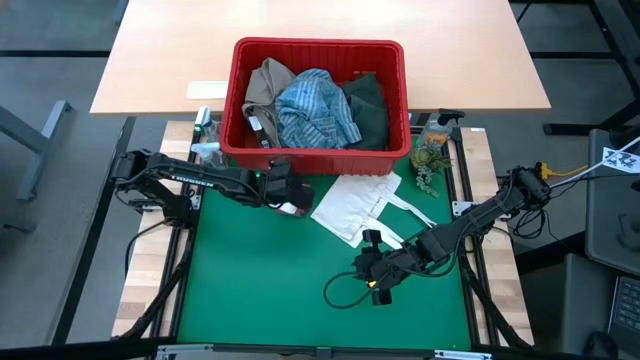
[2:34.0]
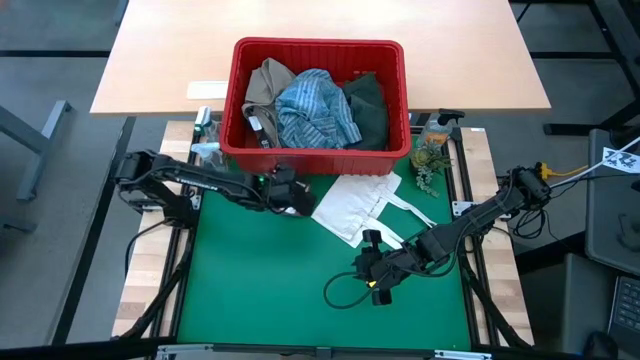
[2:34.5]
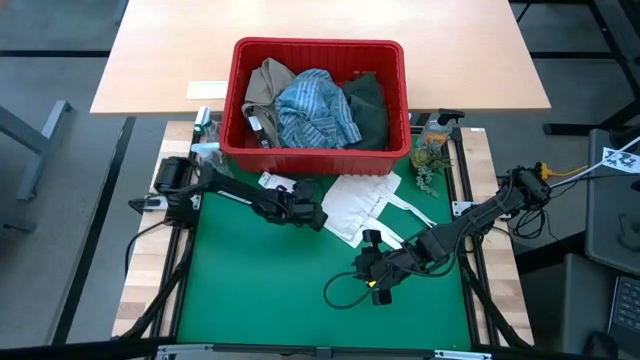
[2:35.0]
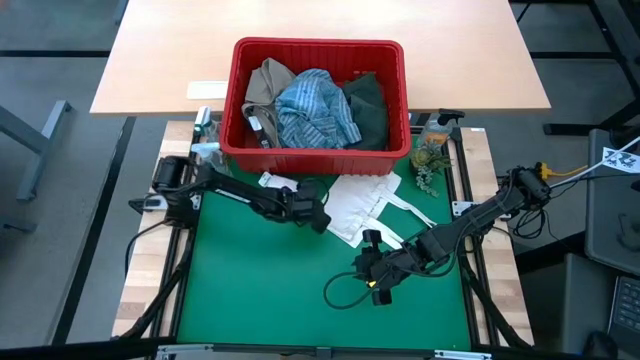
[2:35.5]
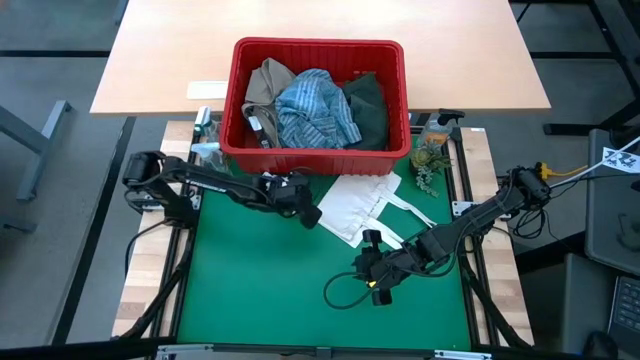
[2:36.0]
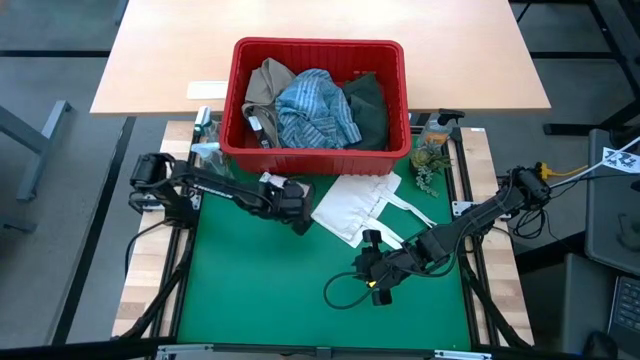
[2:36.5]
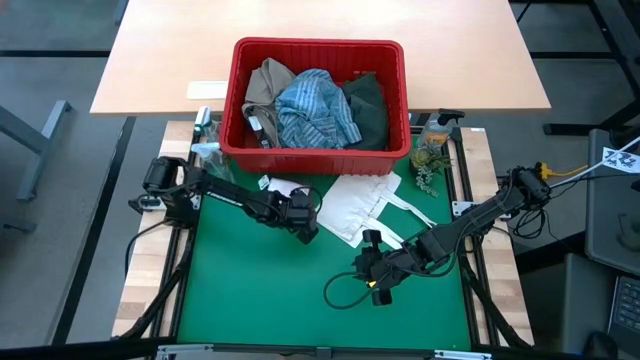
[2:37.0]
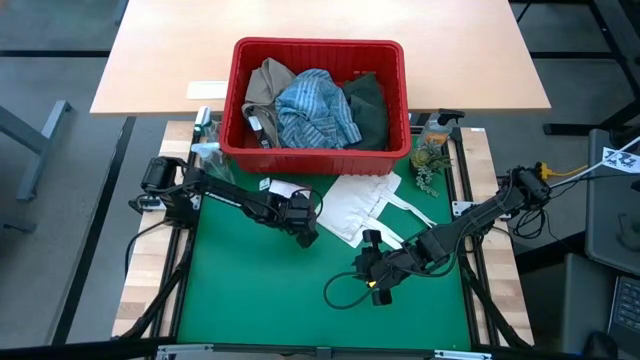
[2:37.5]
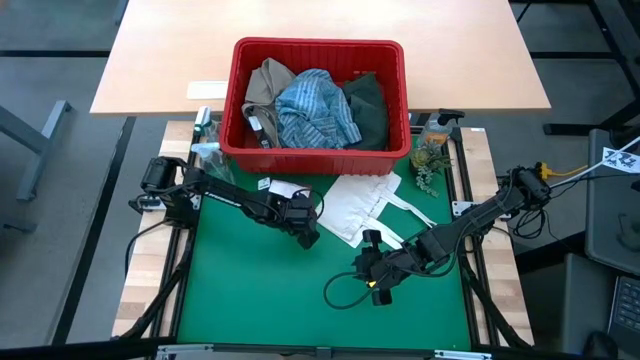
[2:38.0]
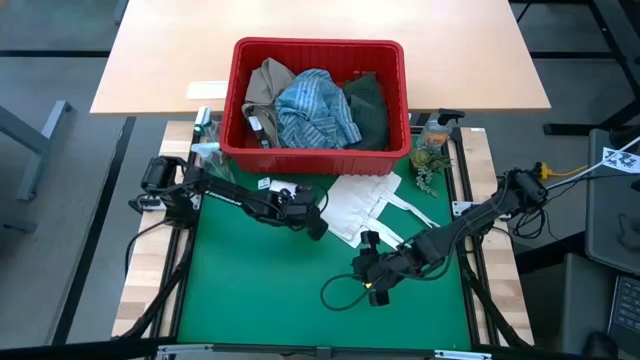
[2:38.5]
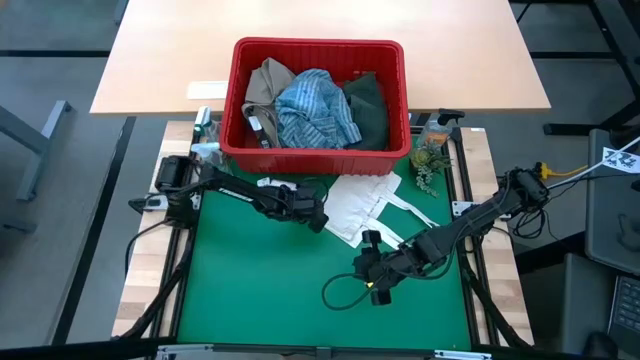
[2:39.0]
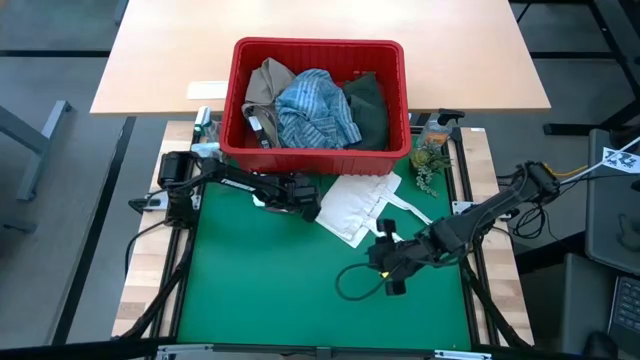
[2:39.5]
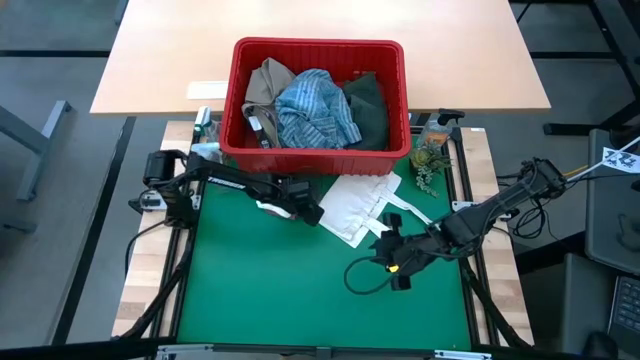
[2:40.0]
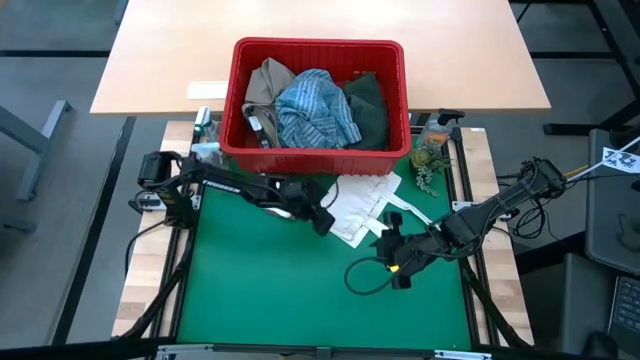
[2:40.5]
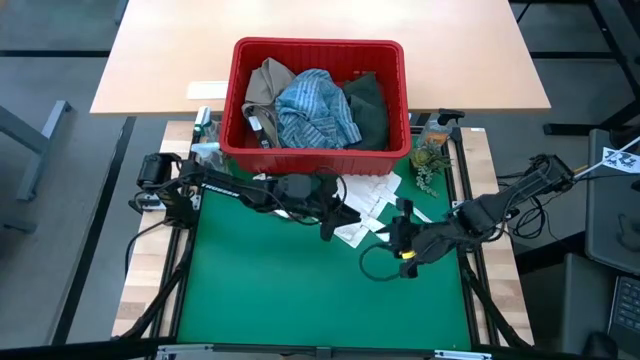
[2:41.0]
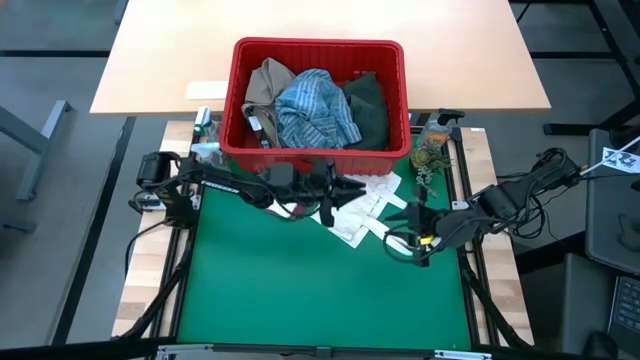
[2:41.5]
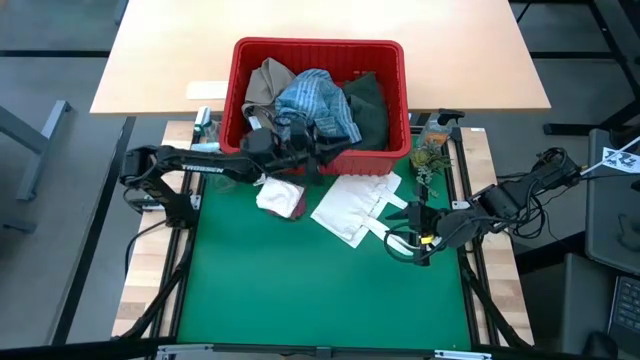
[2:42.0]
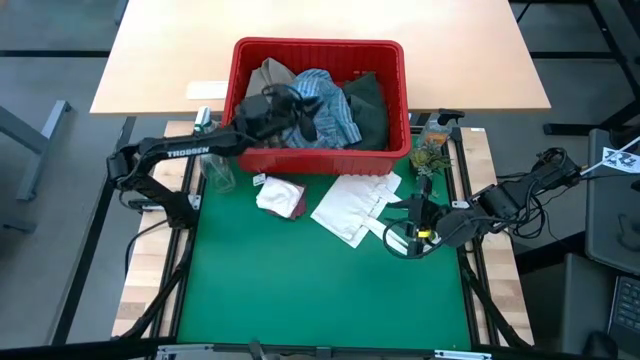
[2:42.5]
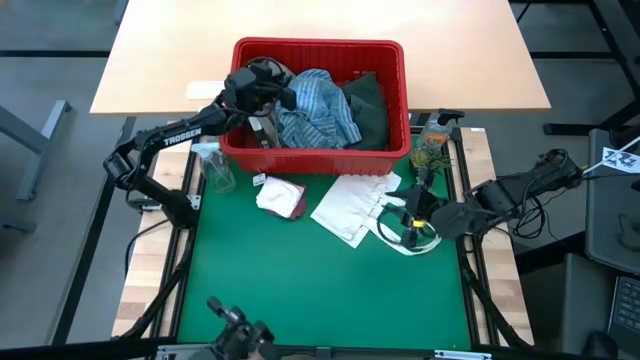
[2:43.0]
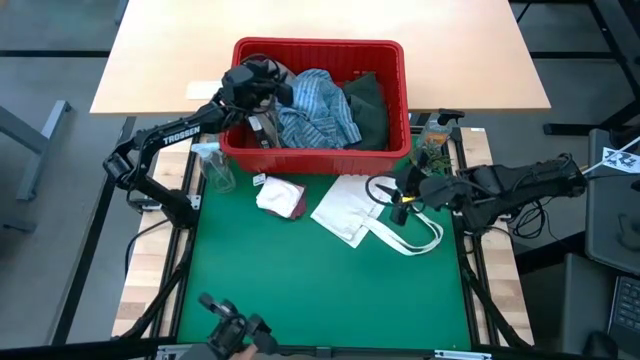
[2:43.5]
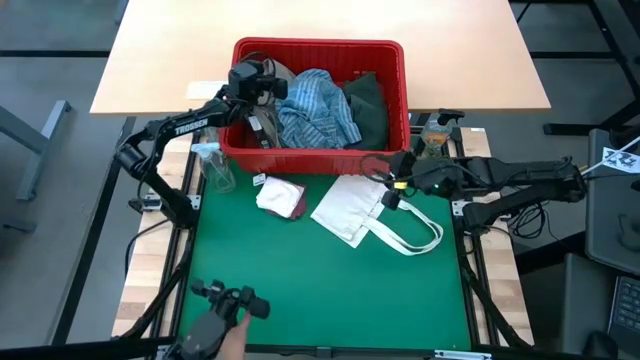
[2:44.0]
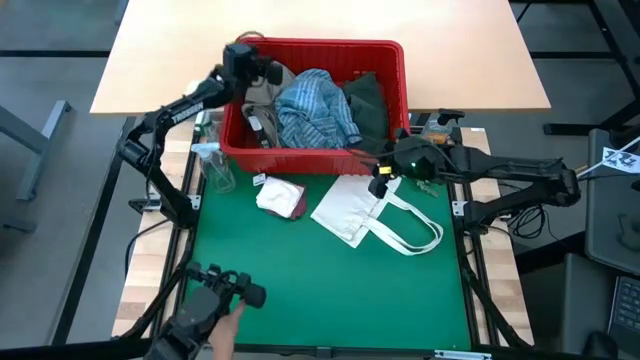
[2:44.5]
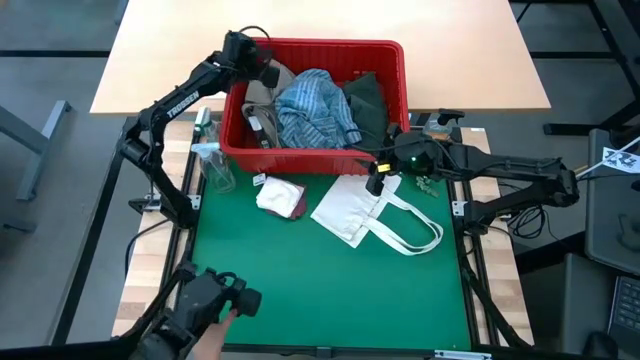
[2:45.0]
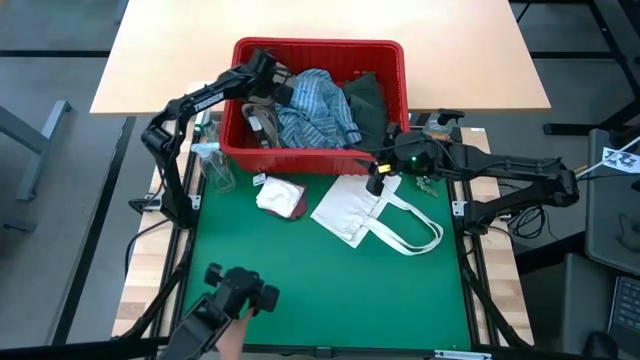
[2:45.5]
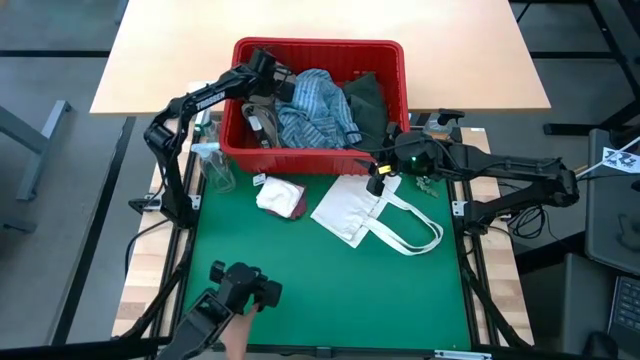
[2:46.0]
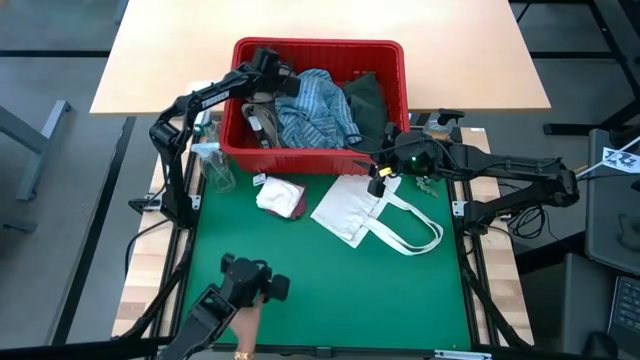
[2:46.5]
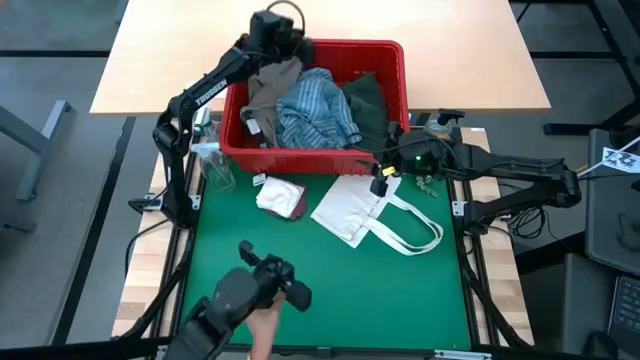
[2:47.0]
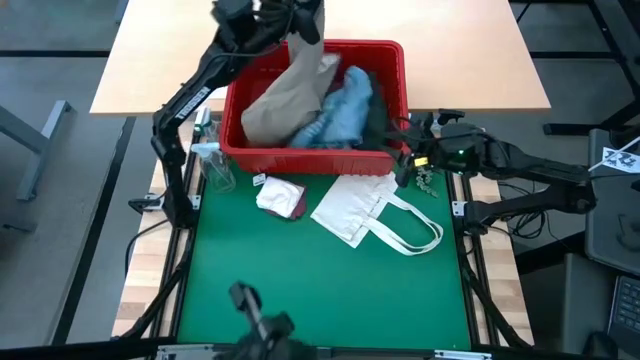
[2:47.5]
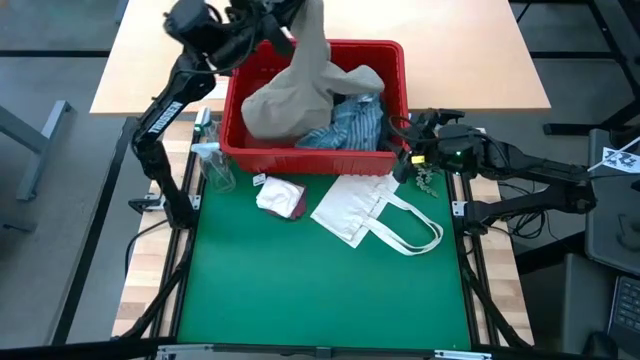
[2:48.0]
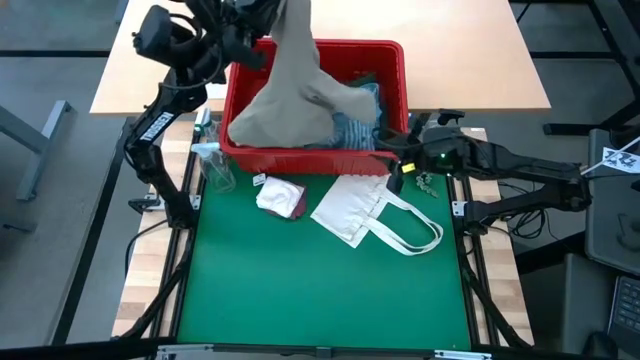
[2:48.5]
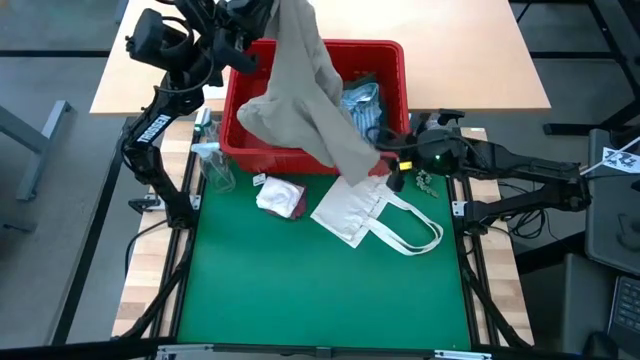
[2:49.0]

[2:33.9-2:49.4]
Task: Fold Laundry from Bin
Remove the gray shorts from the red bin
